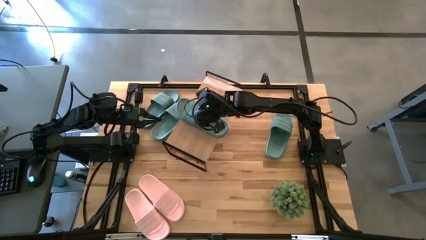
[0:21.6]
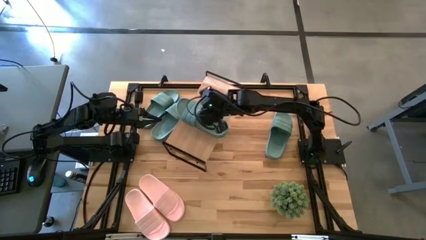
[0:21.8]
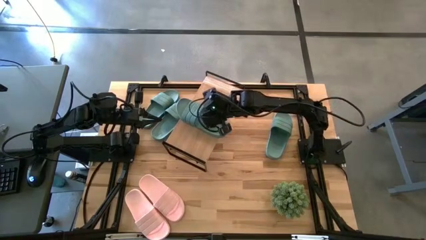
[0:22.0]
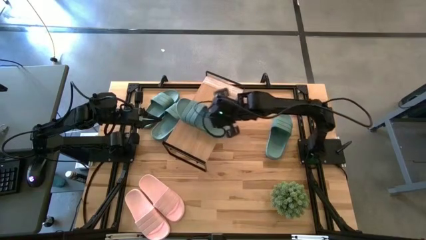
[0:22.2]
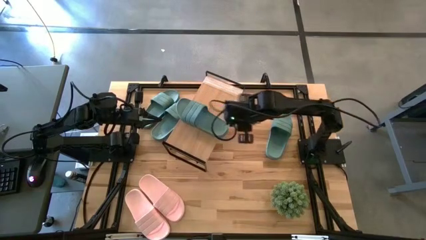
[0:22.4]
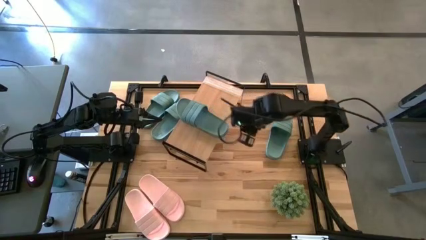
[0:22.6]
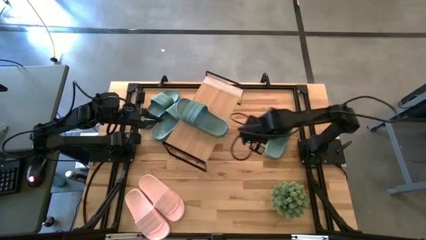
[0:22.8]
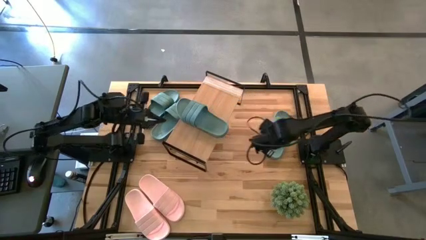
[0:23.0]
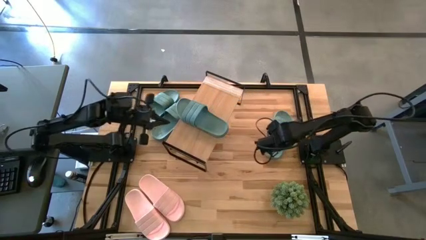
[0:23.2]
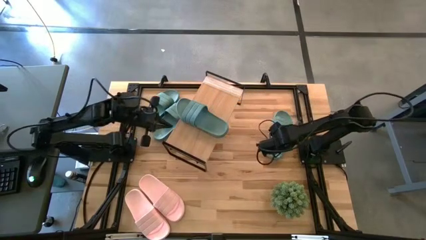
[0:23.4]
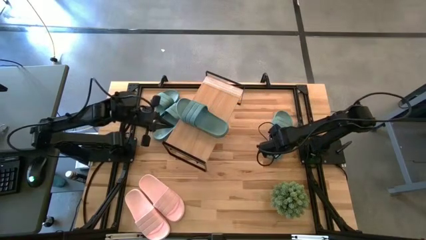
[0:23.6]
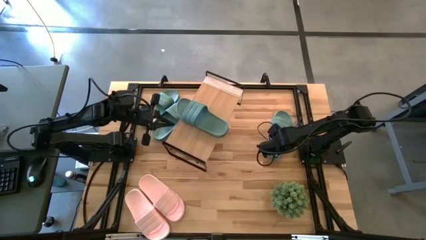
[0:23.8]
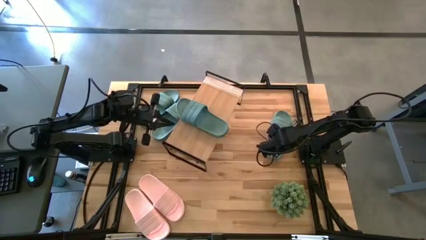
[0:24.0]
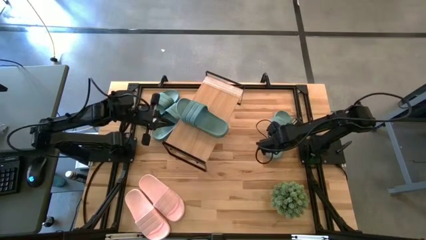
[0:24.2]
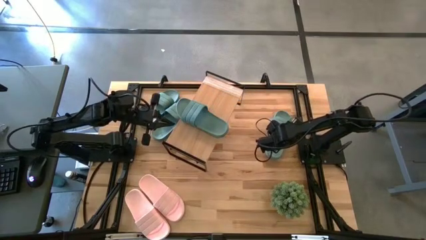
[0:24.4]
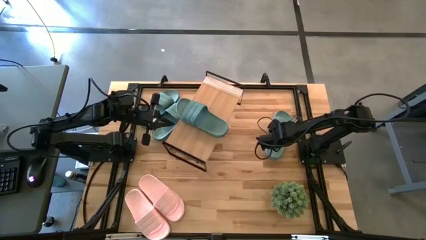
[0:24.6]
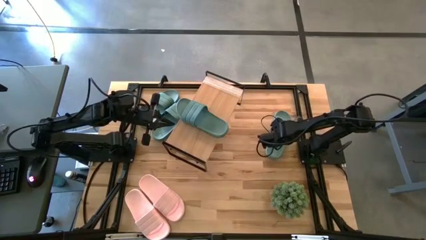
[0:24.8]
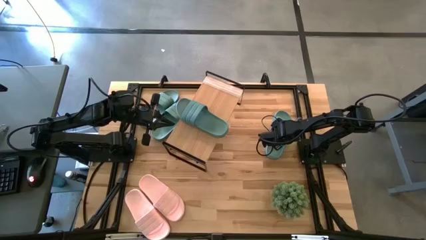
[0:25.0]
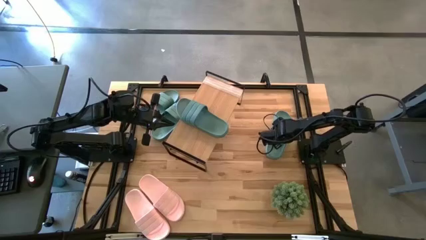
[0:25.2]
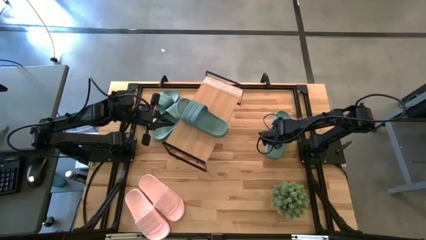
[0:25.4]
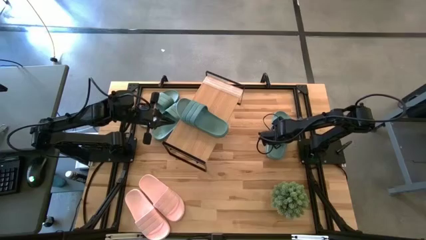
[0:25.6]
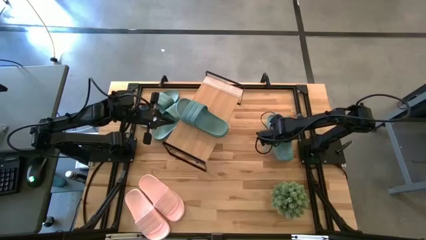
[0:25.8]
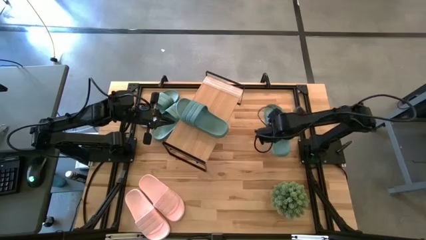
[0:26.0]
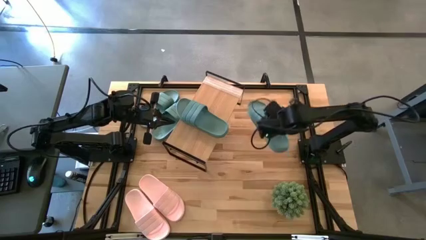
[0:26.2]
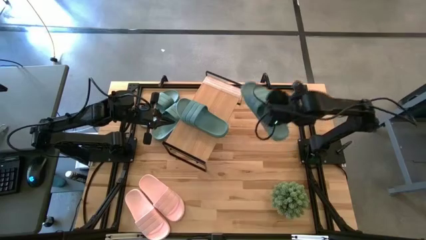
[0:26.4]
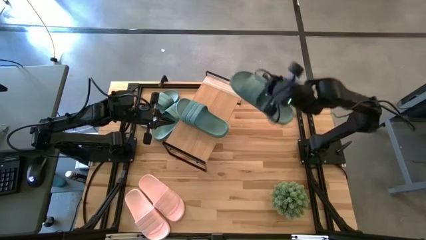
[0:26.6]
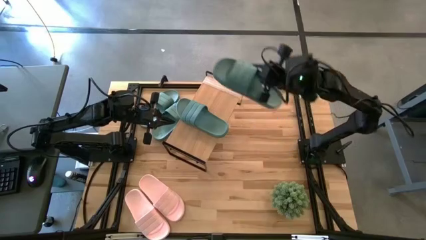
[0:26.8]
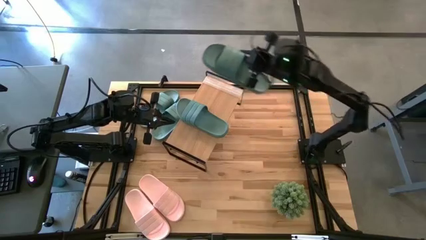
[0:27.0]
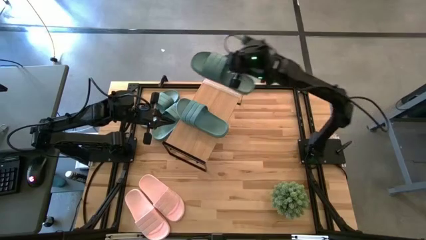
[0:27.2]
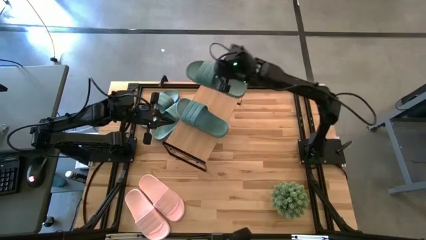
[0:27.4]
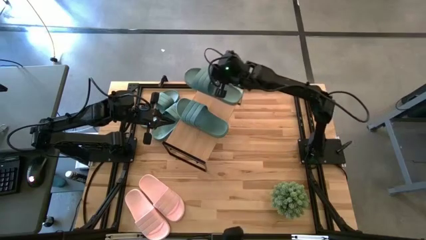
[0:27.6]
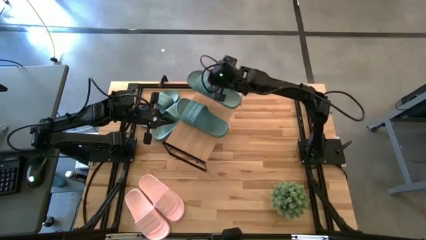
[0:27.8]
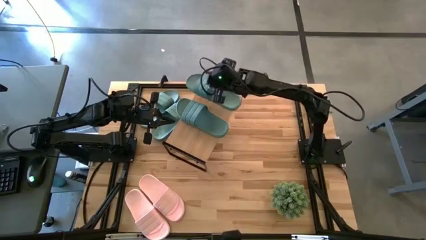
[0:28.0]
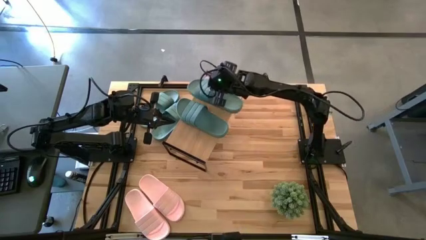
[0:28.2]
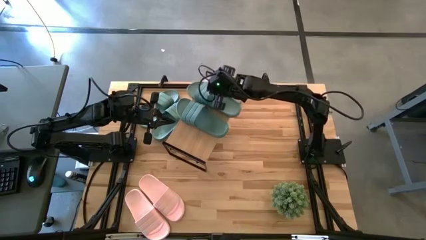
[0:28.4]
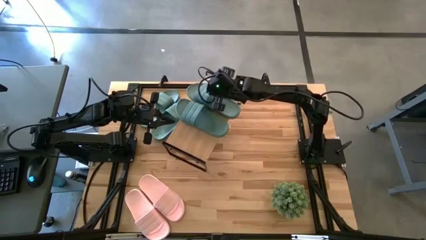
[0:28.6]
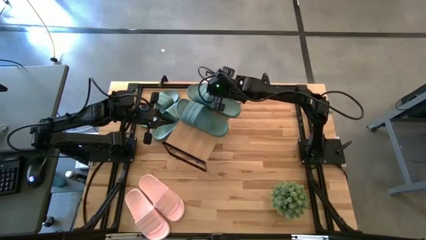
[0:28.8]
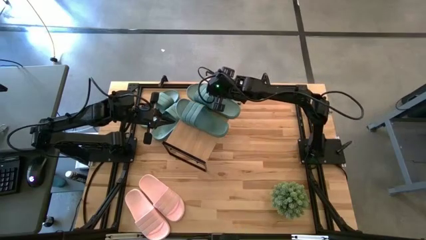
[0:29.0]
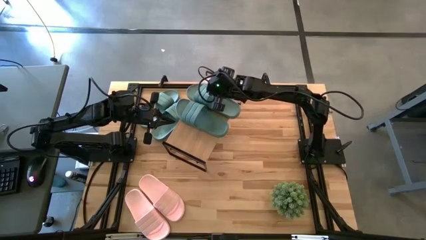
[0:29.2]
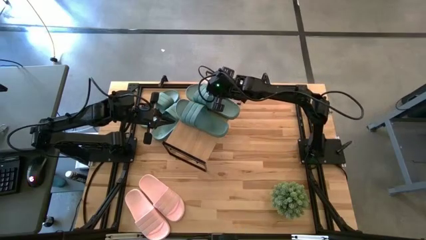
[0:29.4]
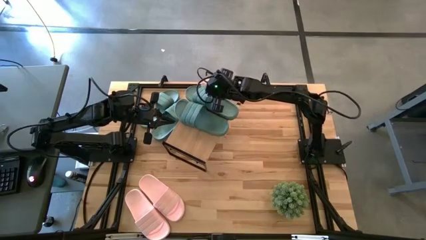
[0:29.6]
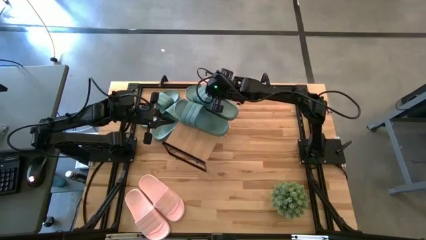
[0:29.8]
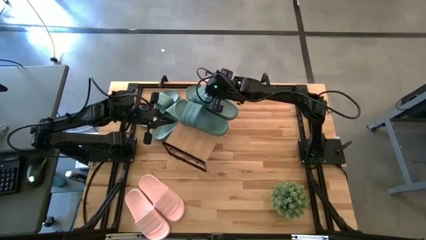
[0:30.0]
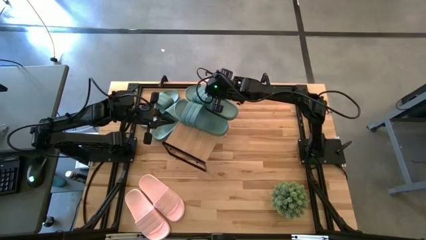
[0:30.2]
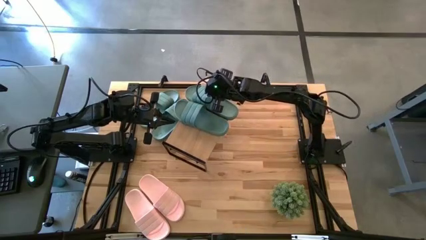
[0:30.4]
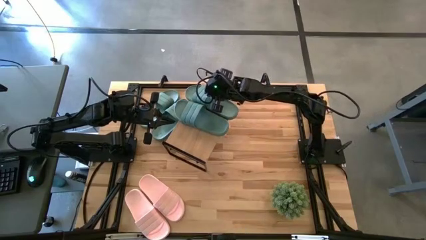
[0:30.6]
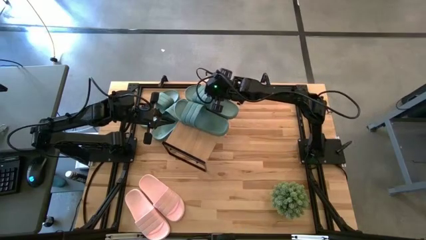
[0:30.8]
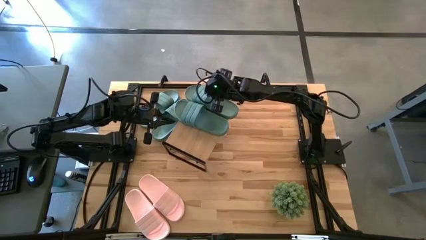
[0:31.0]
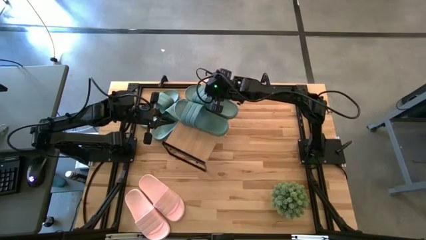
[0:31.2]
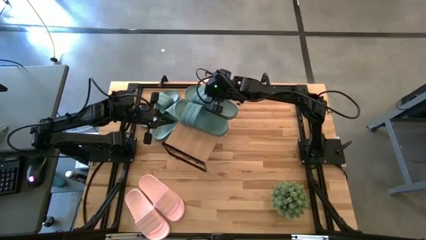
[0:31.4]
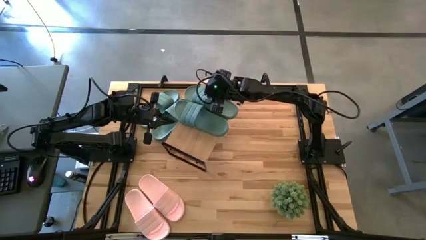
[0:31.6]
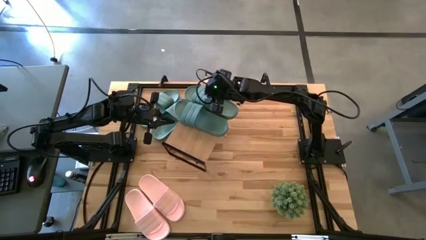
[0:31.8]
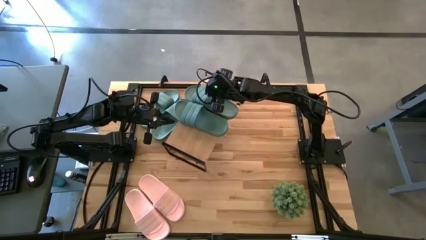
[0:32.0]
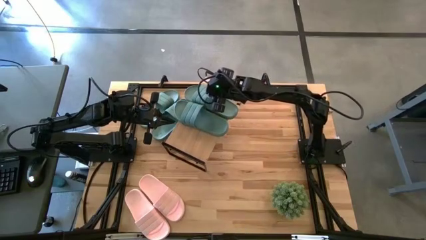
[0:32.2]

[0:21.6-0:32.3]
Task: Pick and place slides into the shelf
Put the green slide on the shelf
